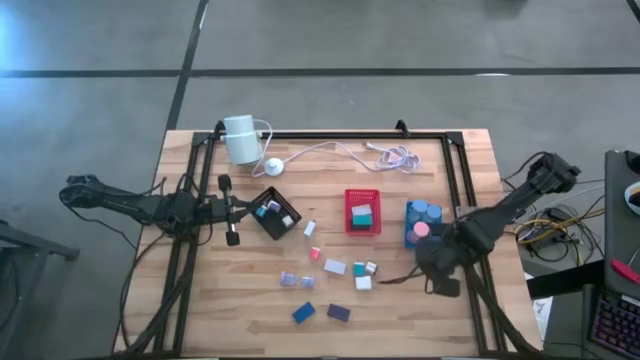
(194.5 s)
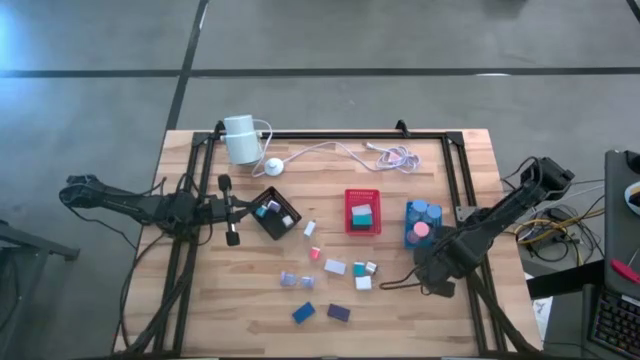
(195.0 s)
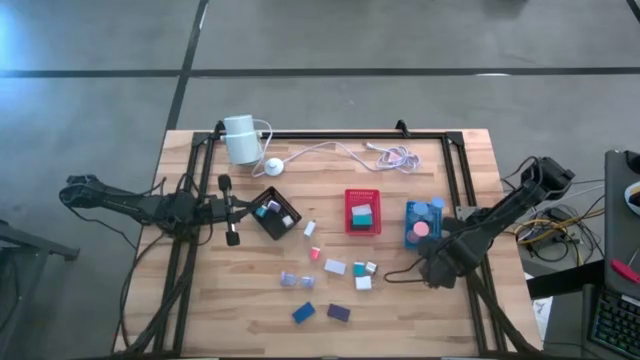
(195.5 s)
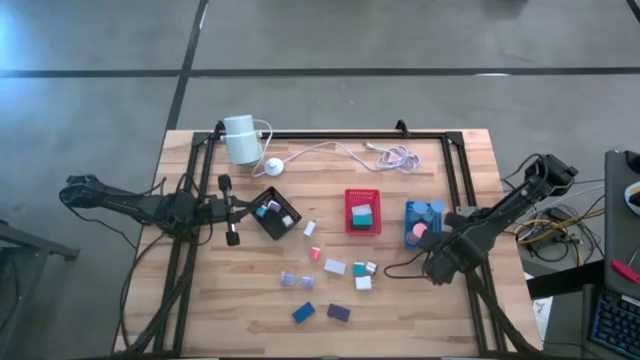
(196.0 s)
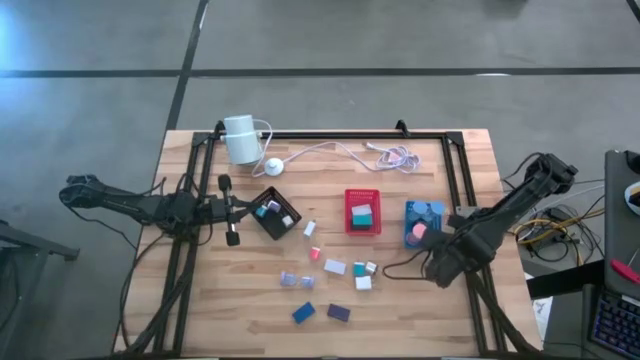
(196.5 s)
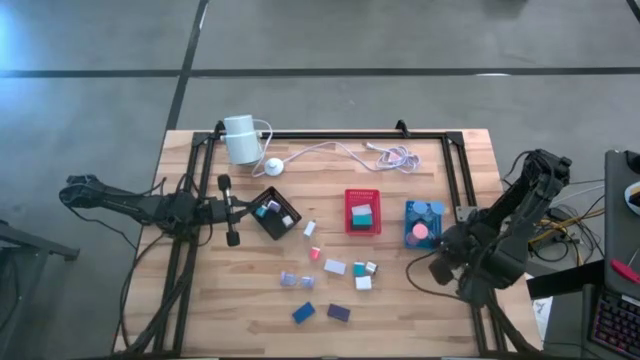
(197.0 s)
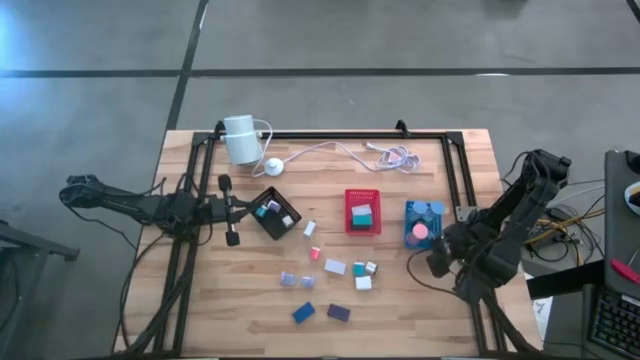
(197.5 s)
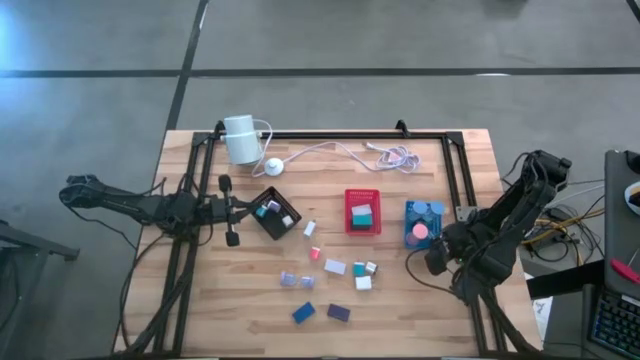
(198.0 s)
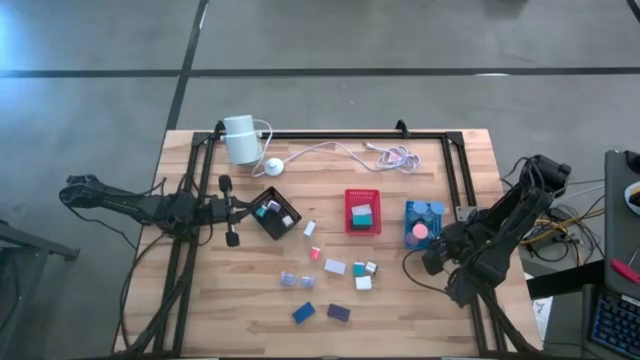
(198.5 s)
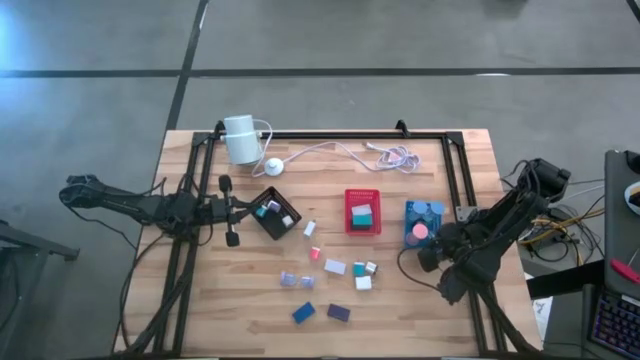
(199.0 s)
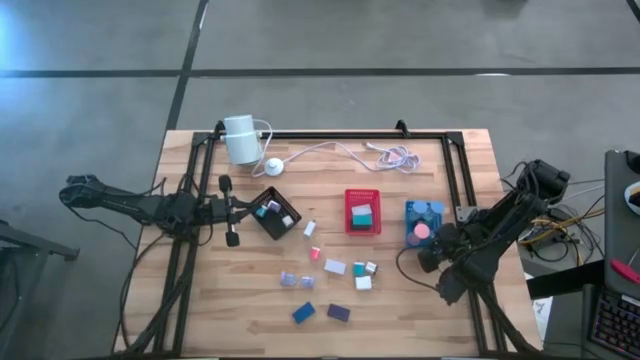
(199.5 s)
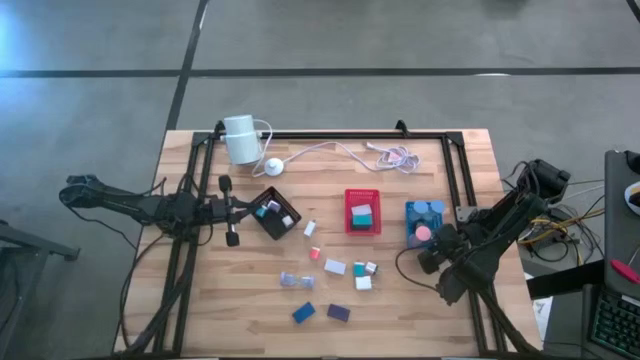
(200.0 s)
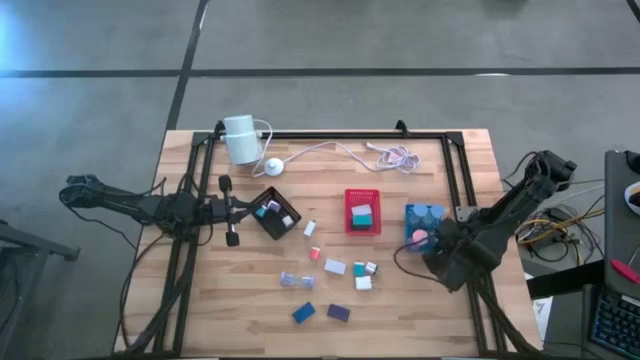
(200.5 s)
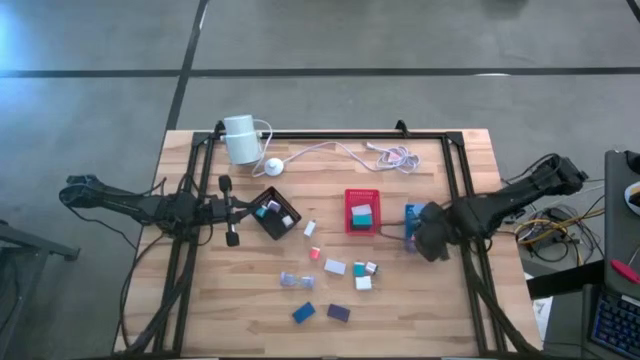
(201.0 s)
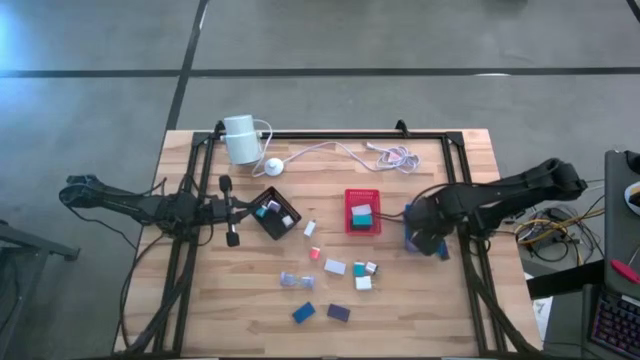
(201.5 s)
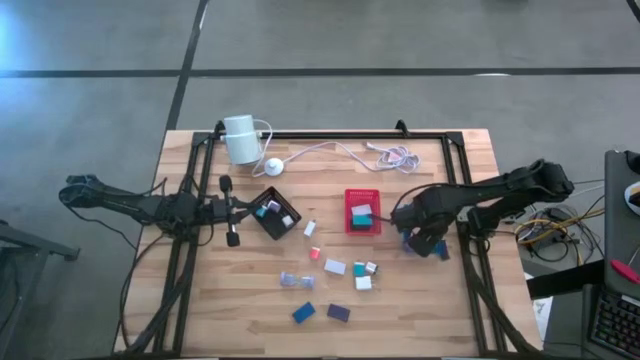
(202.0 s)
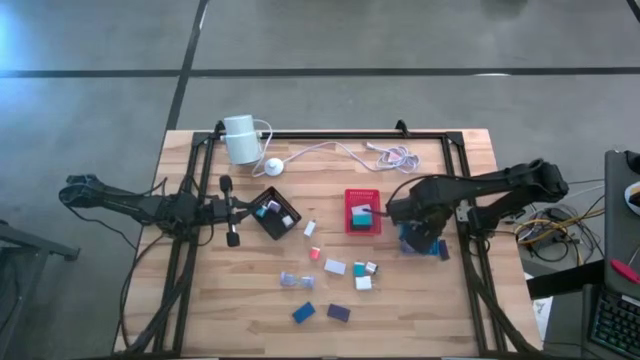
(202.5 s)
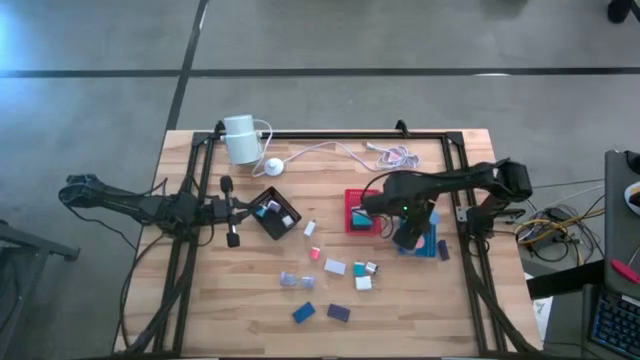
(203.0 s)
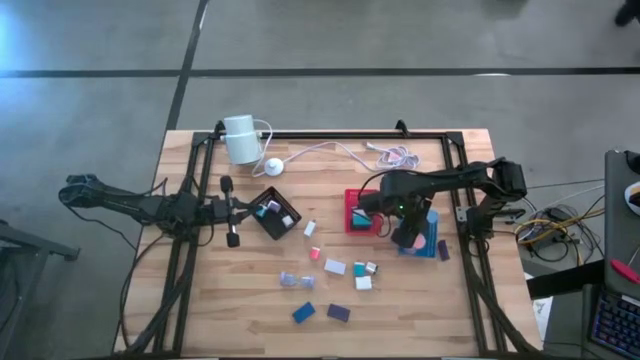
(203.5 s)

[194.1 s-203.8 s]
Task: Pick & Place Office items
Put the black blue hourglass into the blue bin

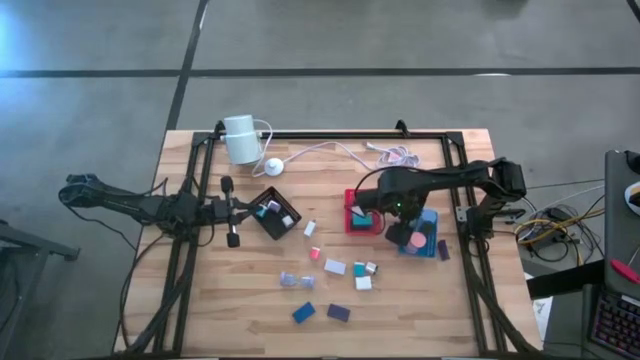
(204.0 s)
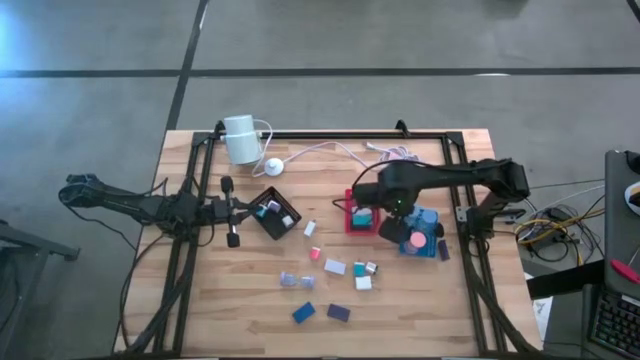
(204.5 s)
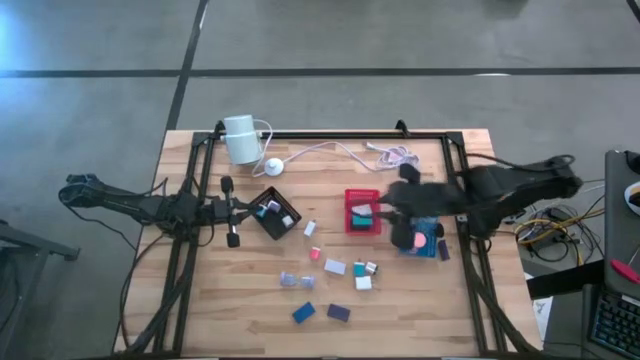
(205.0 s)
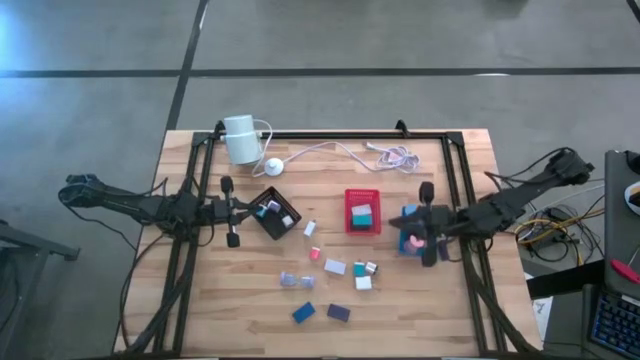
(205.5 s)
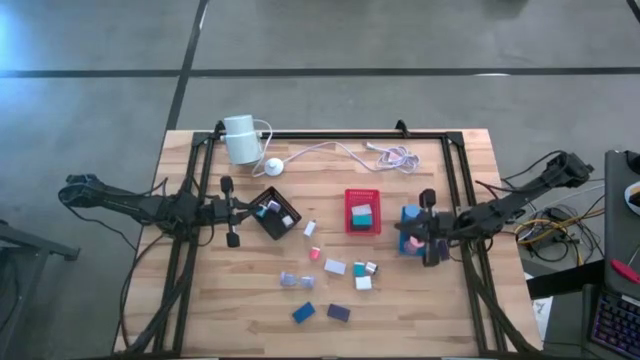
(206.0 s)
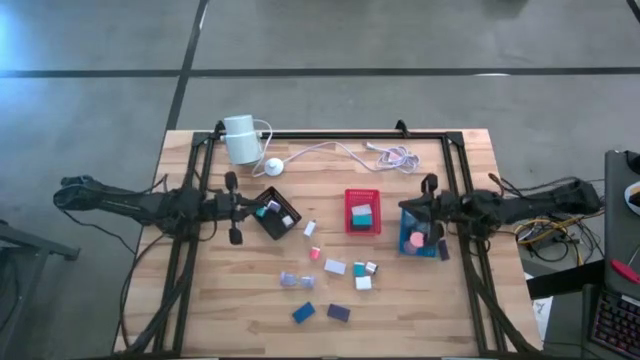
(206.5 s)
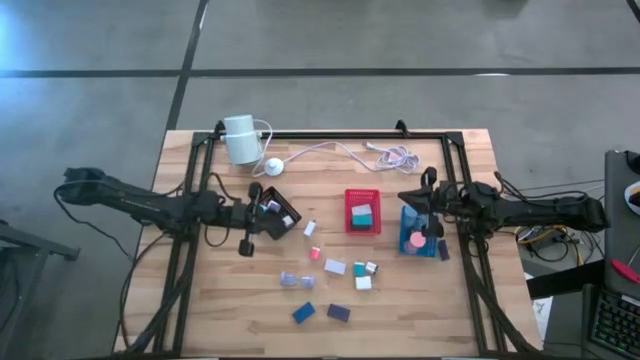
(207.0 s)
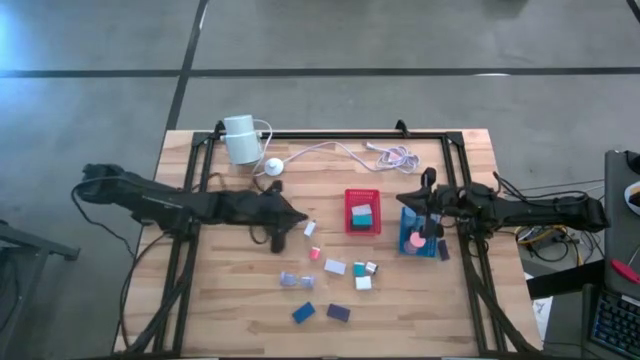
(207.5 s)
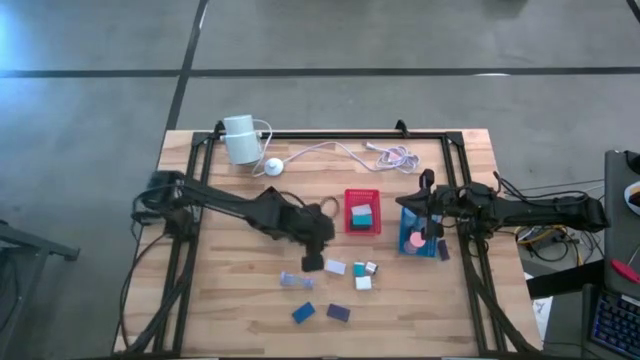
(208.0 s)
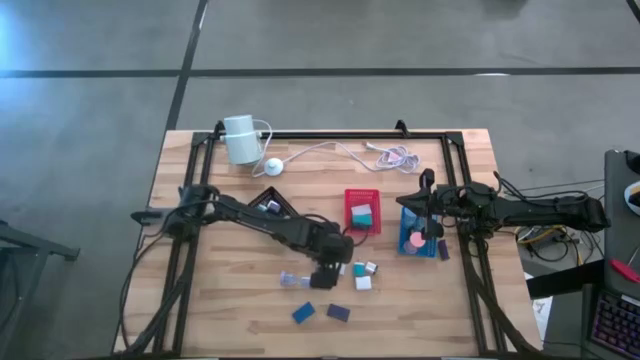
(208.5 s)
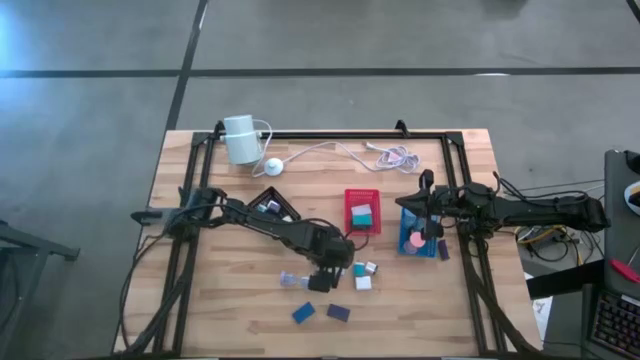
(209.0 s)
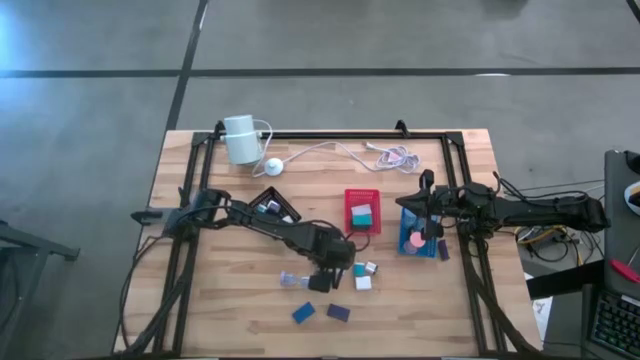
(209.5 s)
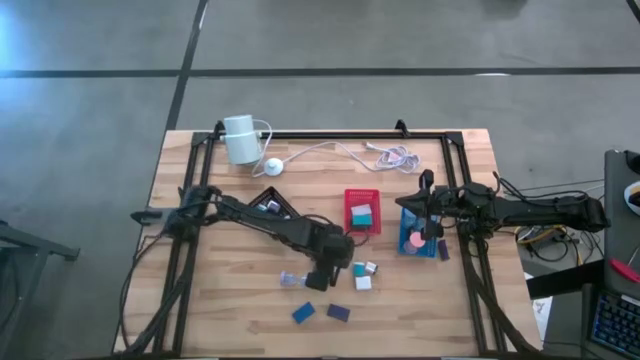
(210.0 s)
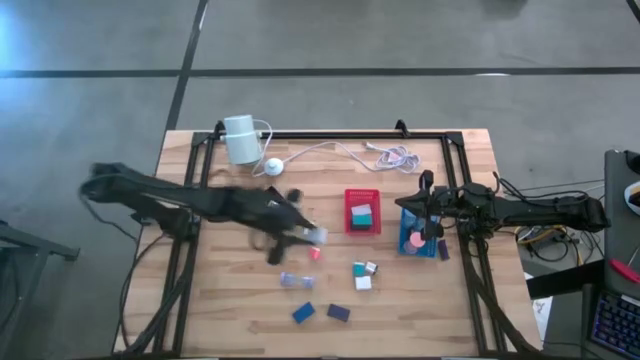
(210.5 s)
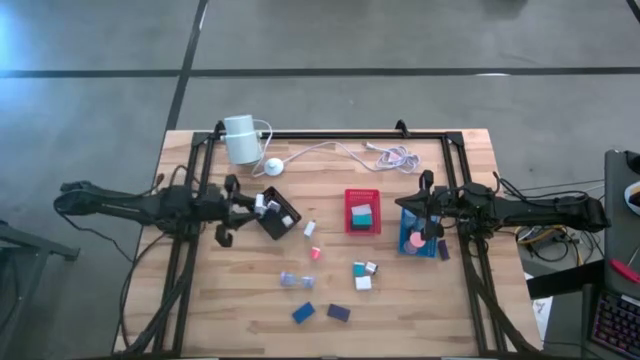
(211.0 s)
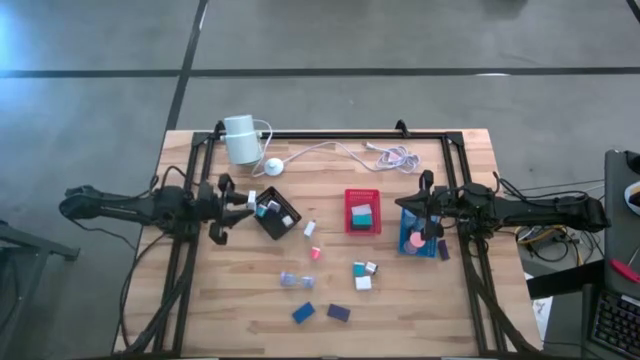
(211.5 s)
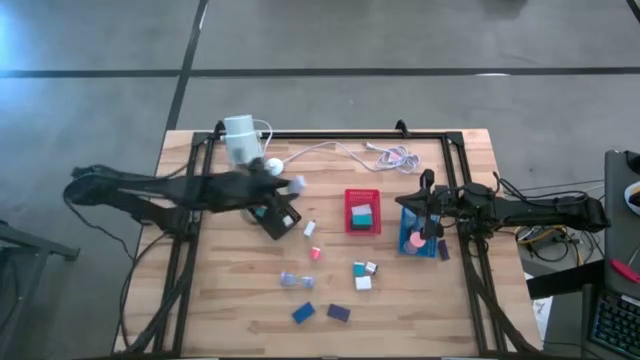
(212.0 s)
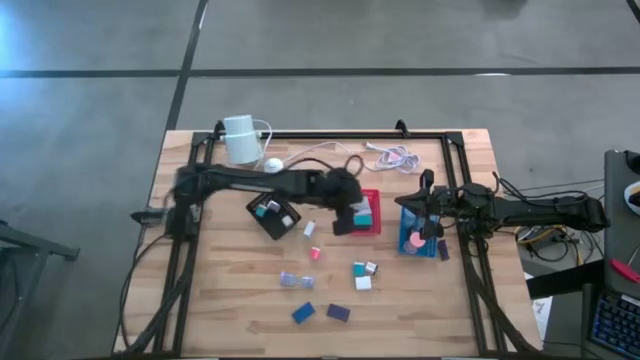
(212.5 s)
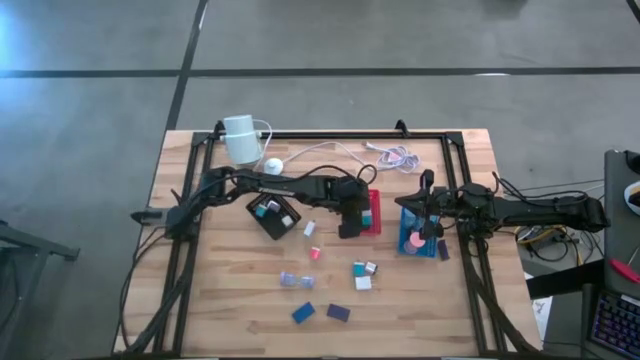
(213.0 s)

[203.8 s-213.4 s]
Put the white digital clock into the red bin
